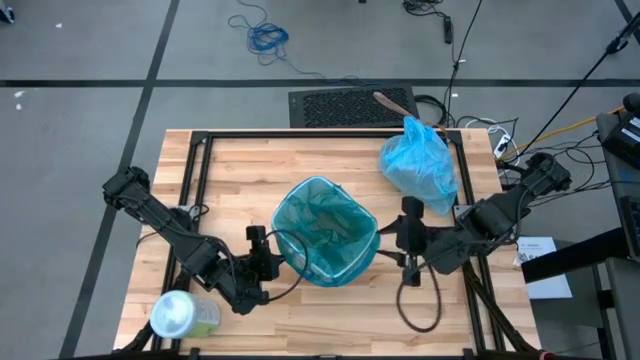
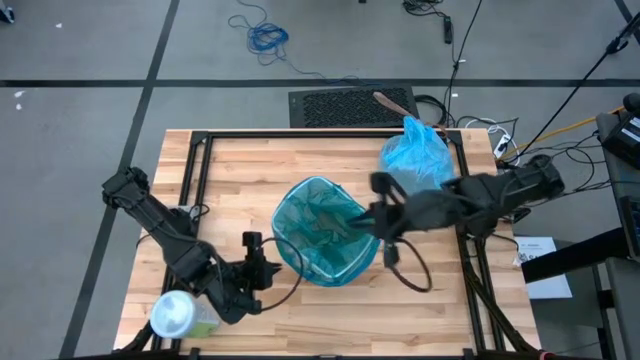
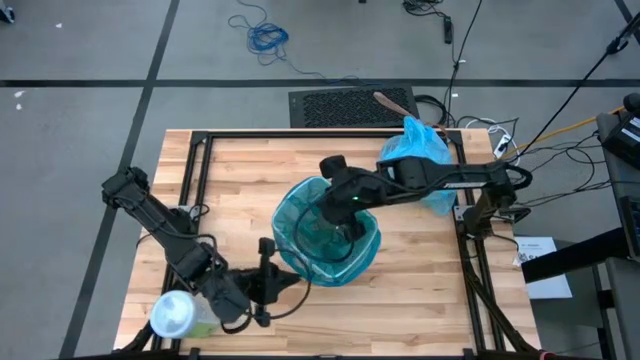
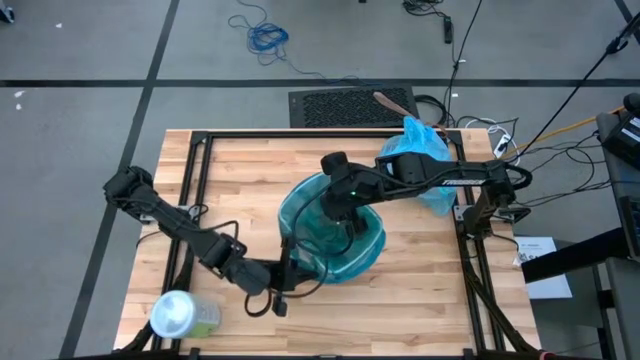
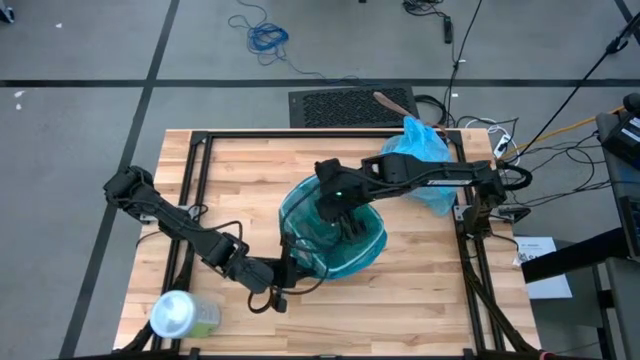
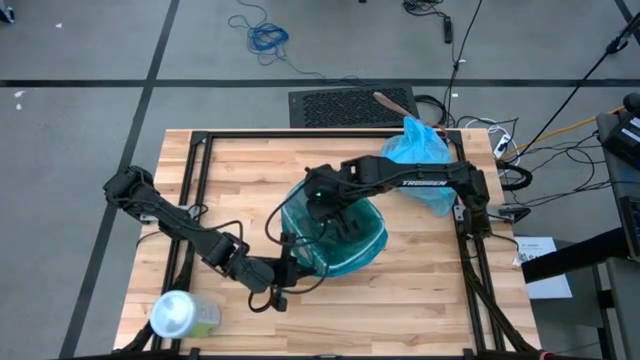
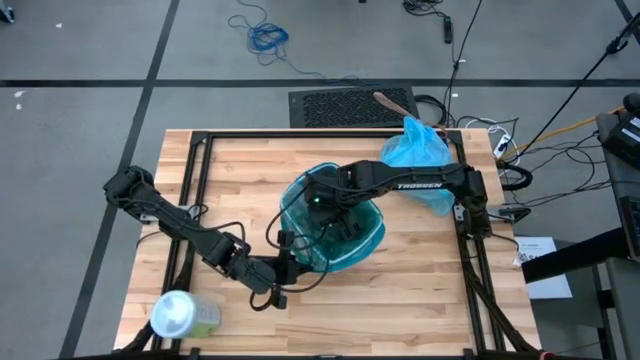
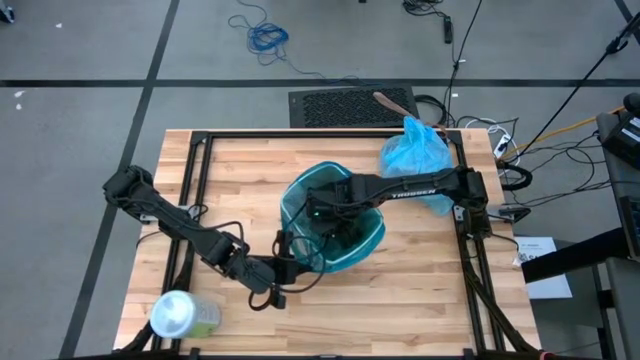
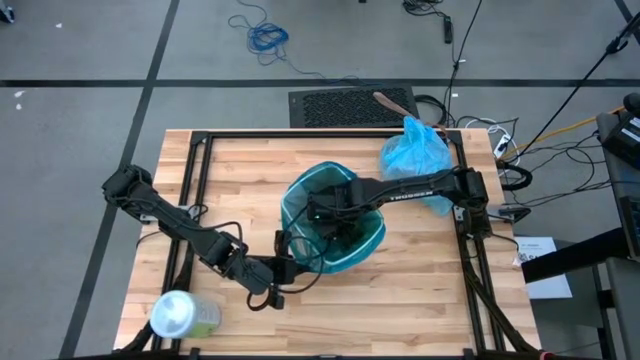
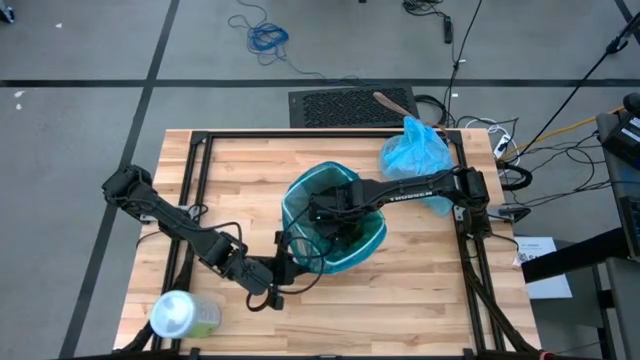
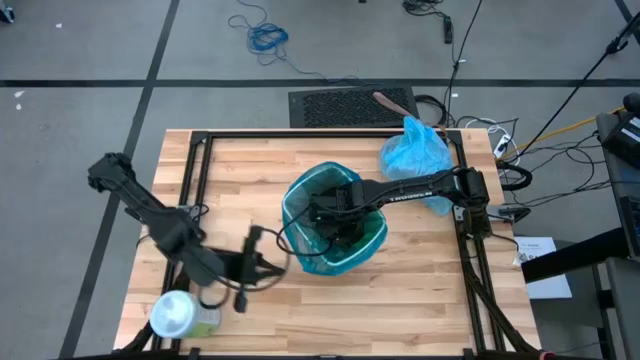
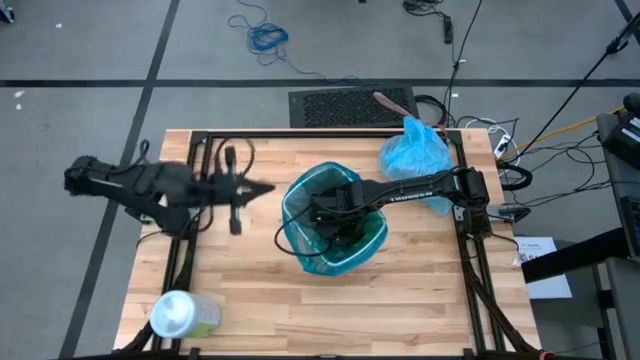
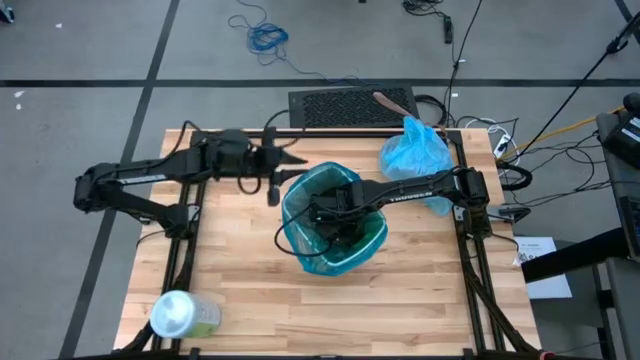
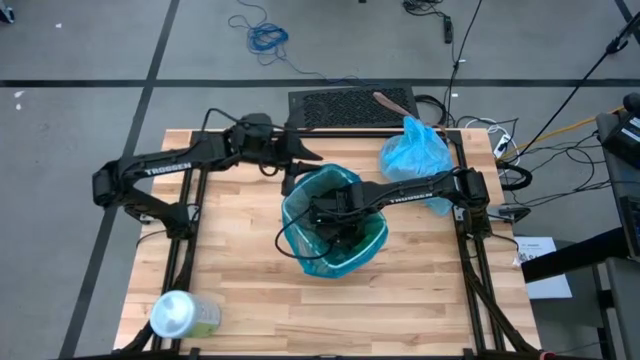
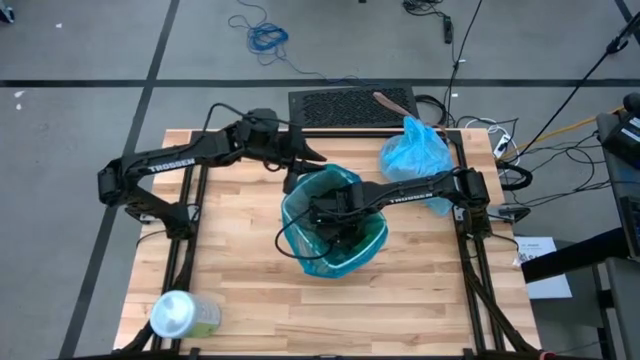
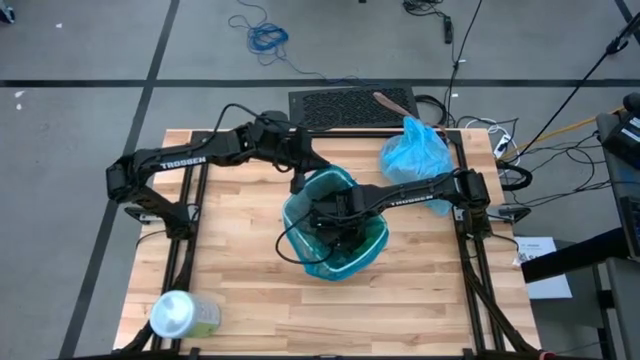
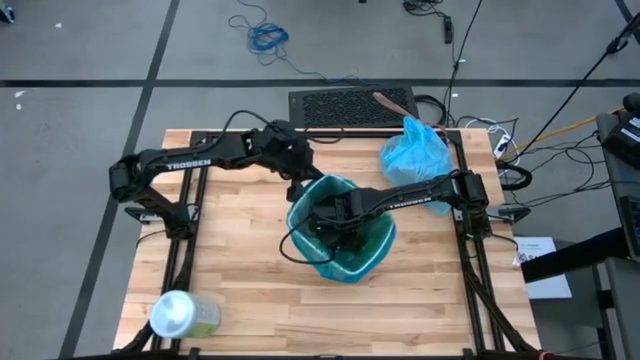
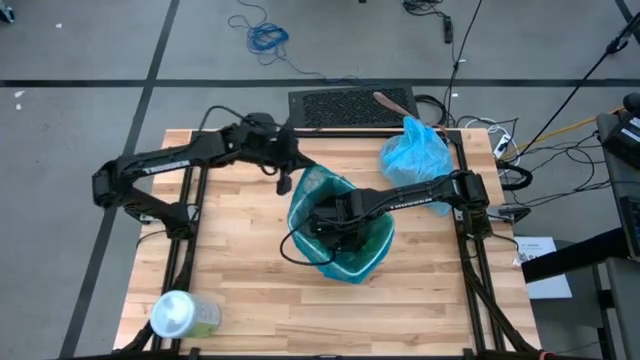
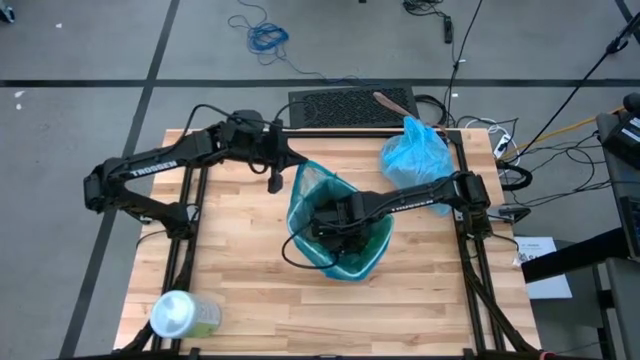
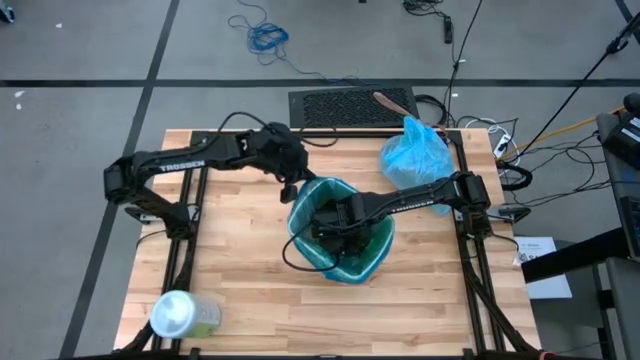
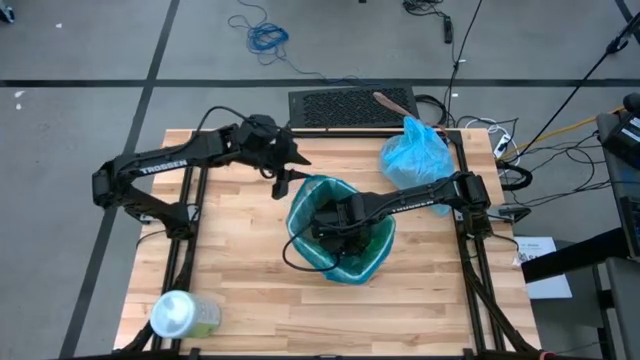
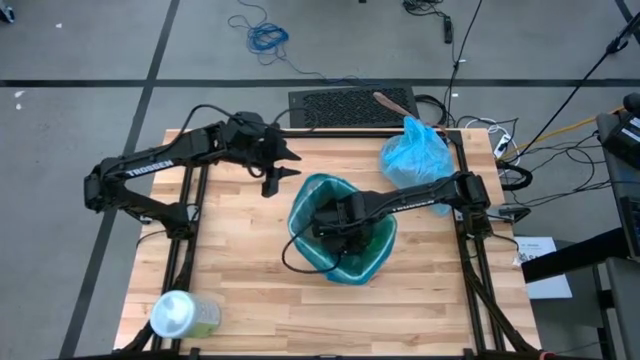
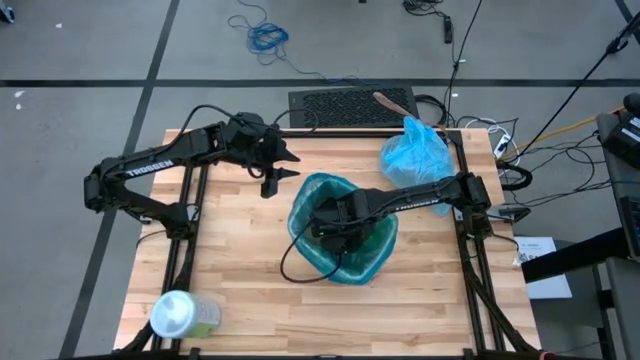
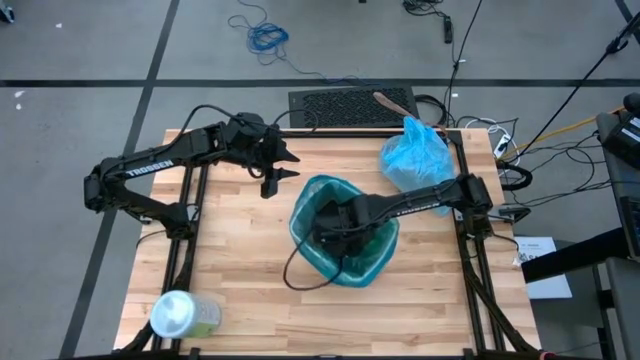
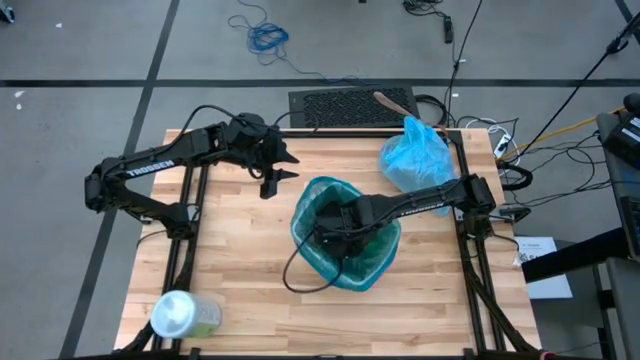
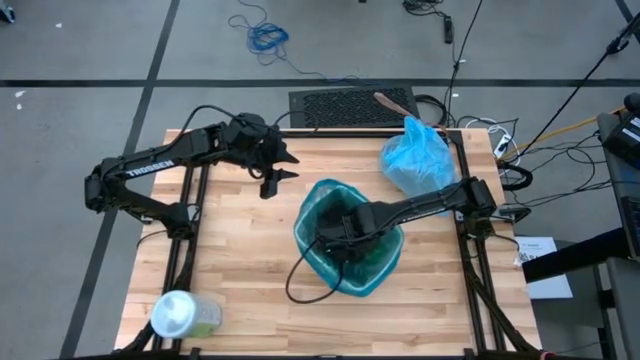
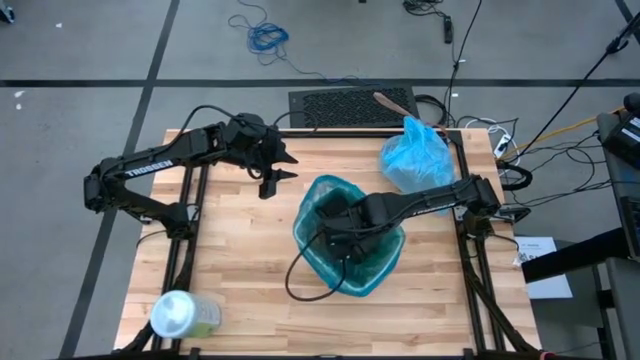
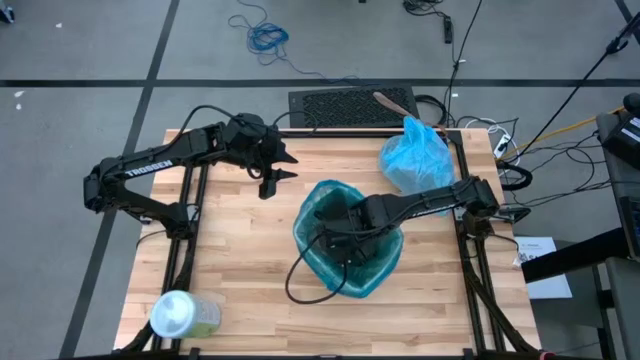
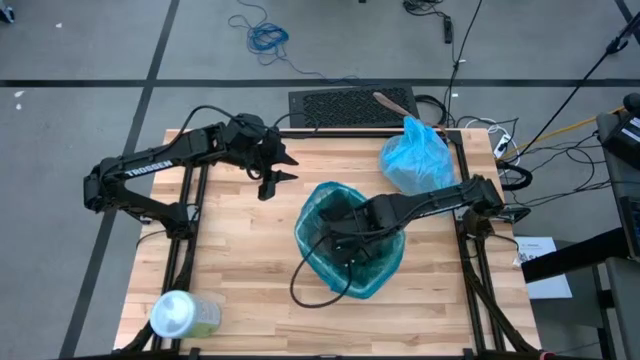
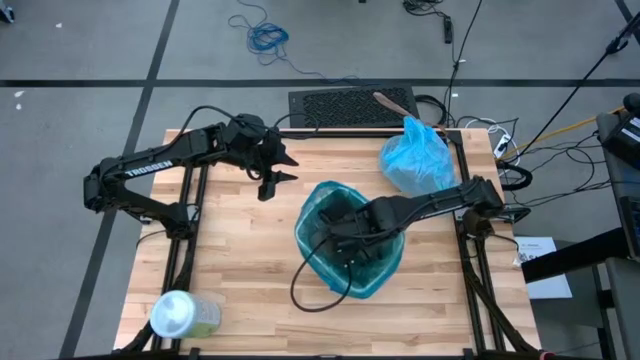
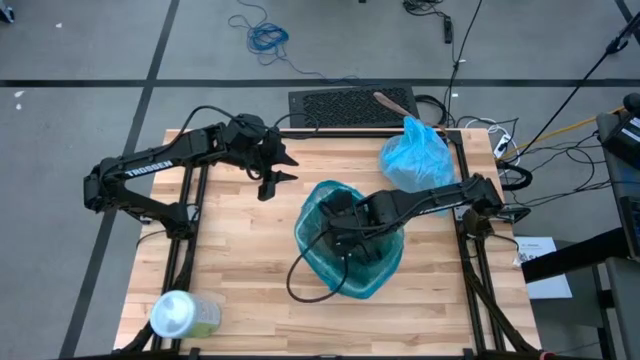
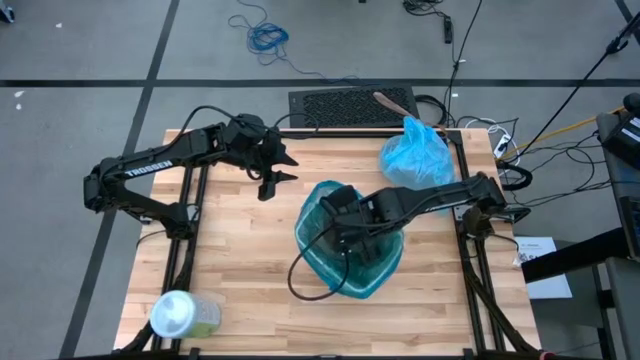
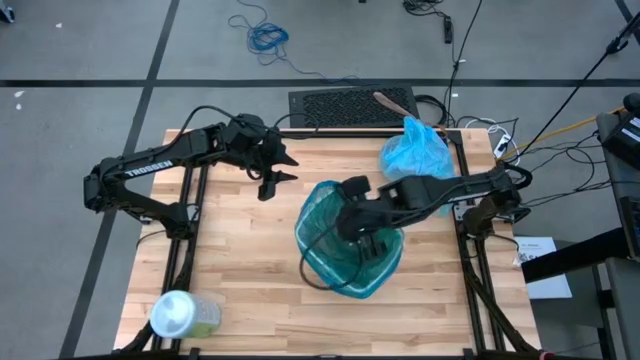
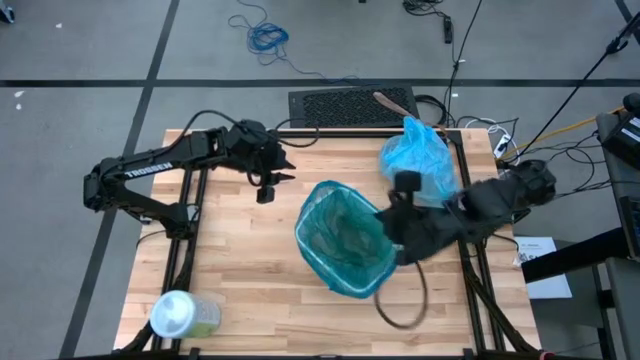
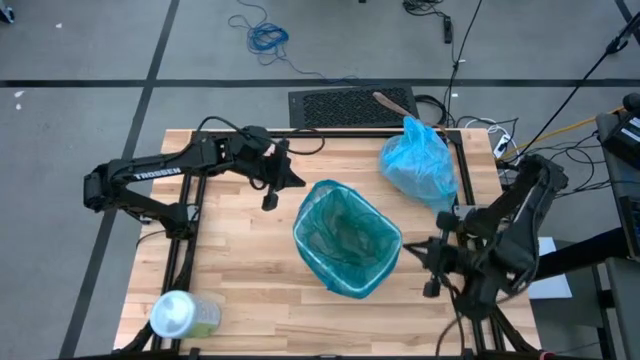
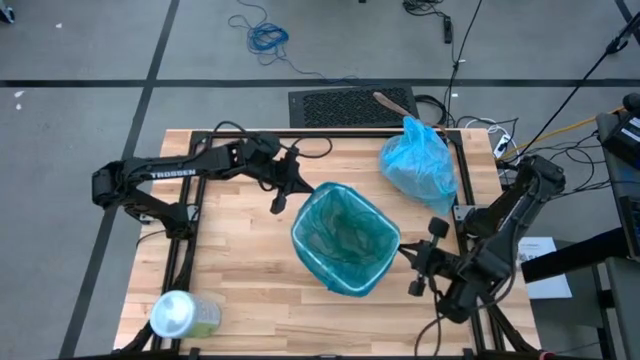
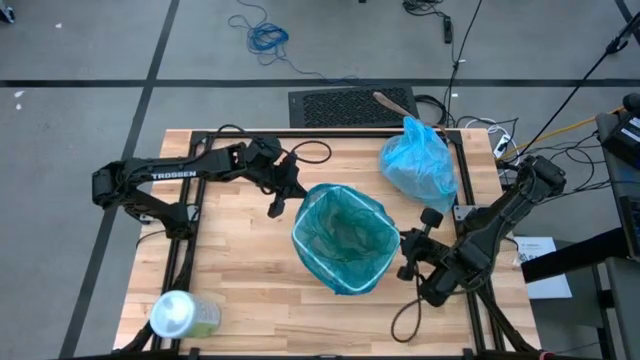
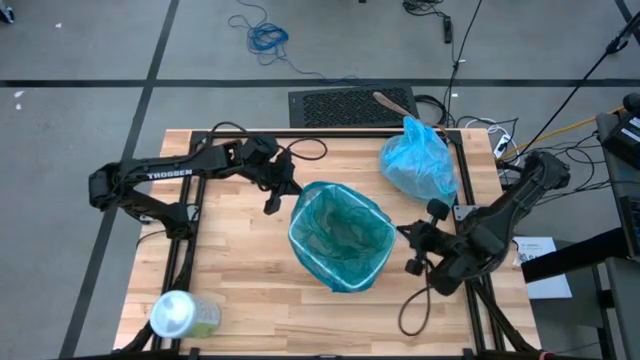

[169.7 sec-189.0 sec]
Task: place trash/remove bag and relplace
Insert the blue trash bag into the trash bin

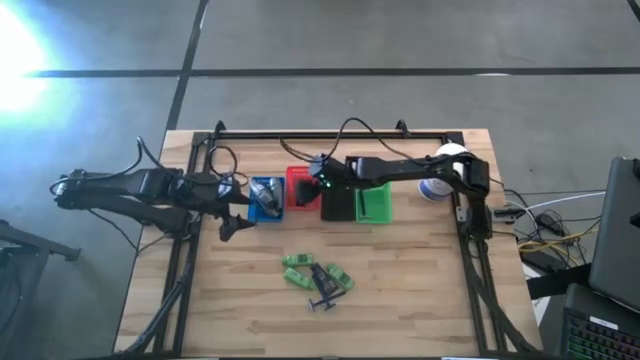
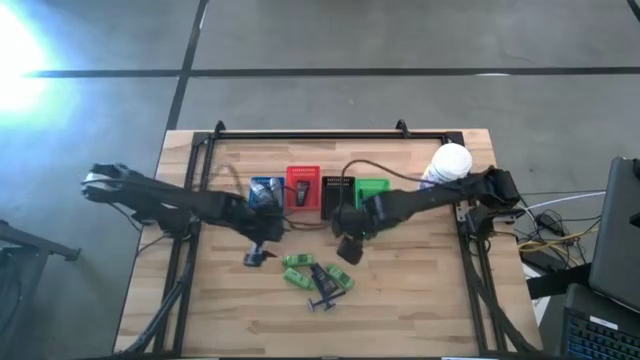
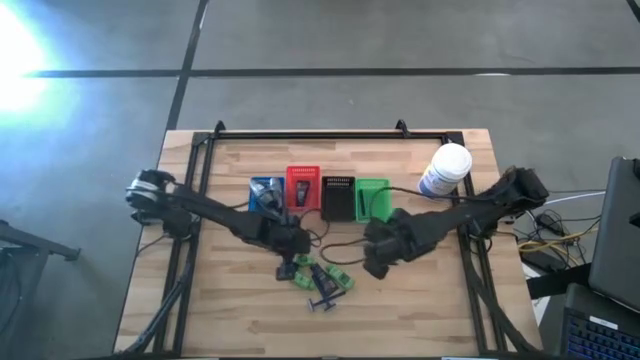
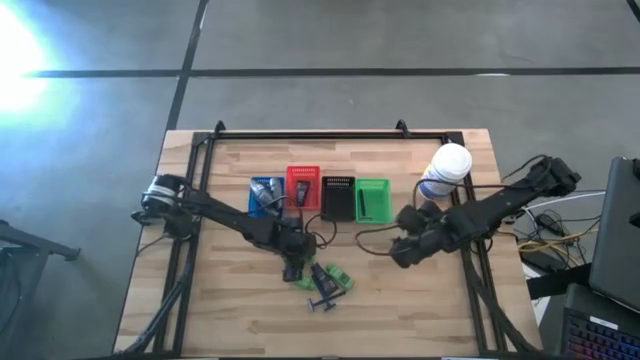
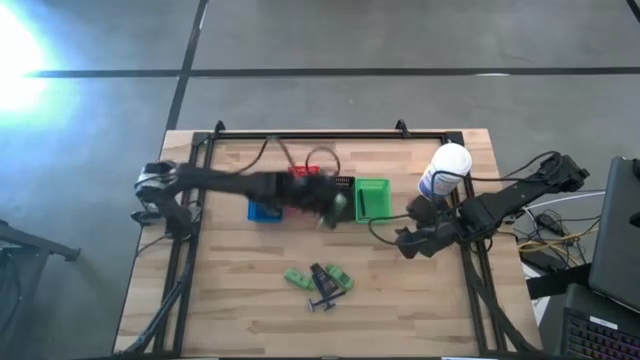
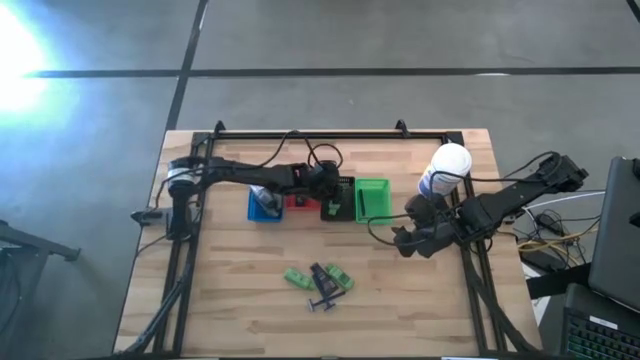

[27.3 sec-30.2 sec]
Task: Pick & Place Travel size toiletries
Put the green shampoo into the black bin

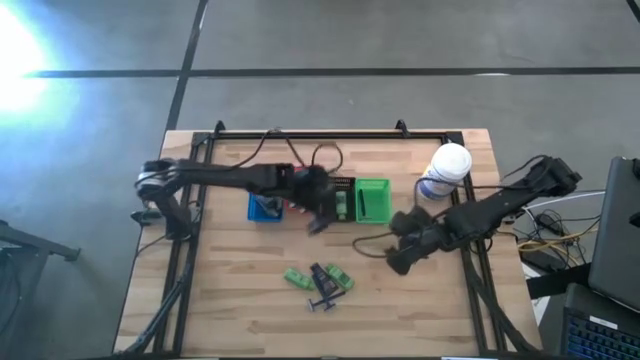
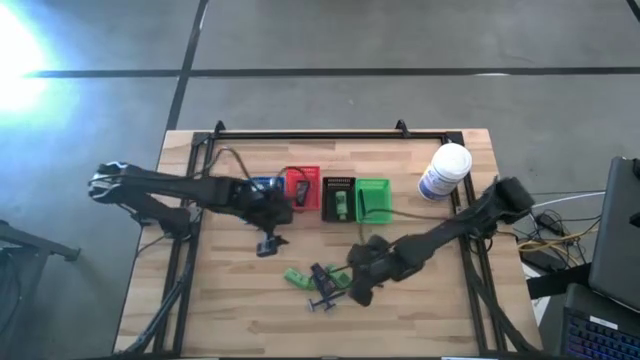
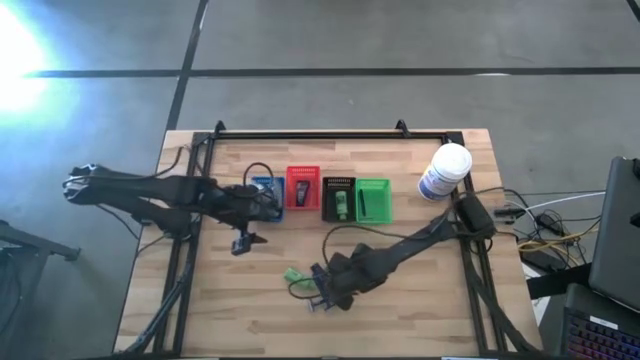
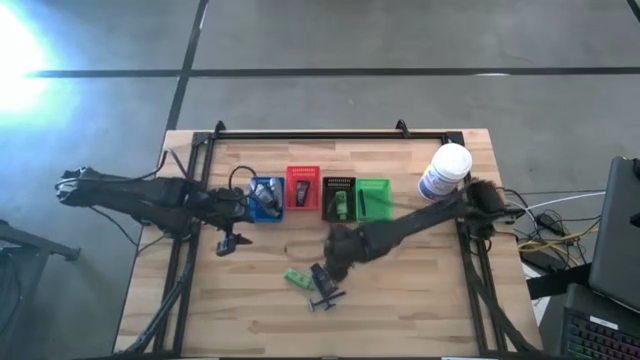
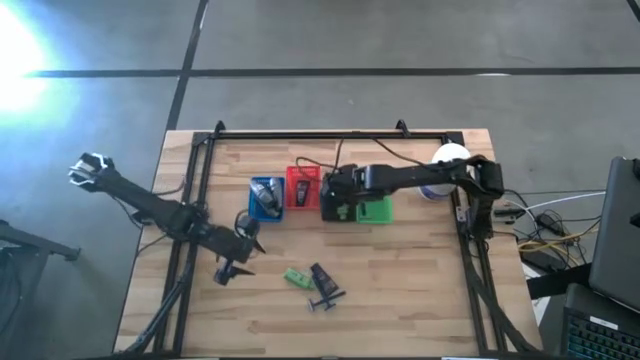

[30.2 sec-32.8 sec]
Put the green shampoo into the black bin
